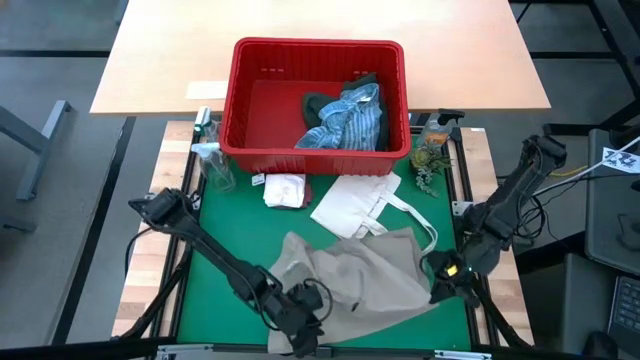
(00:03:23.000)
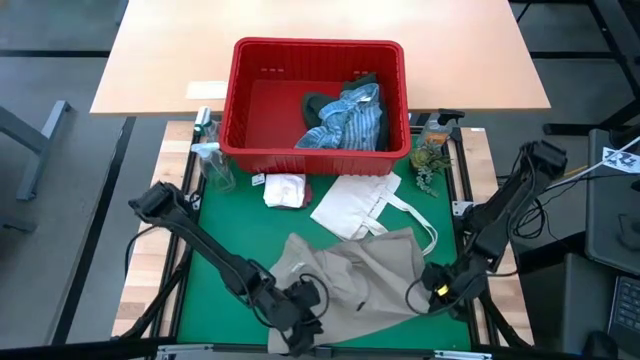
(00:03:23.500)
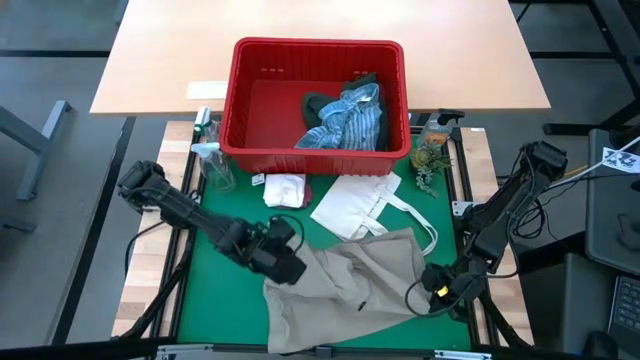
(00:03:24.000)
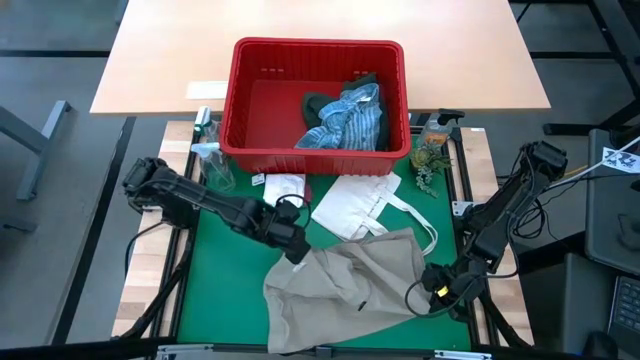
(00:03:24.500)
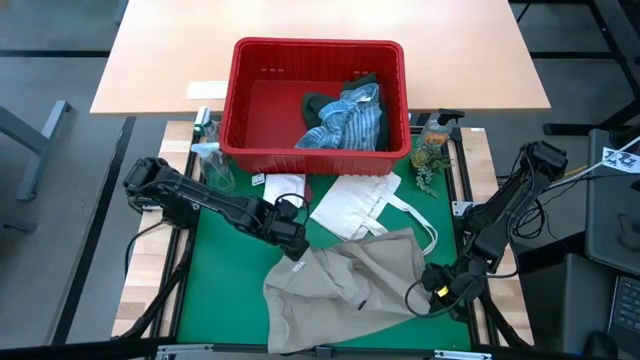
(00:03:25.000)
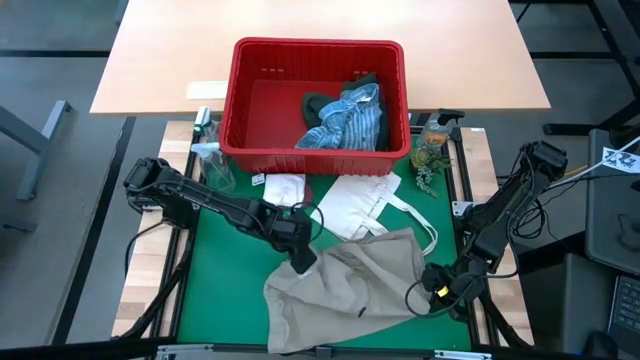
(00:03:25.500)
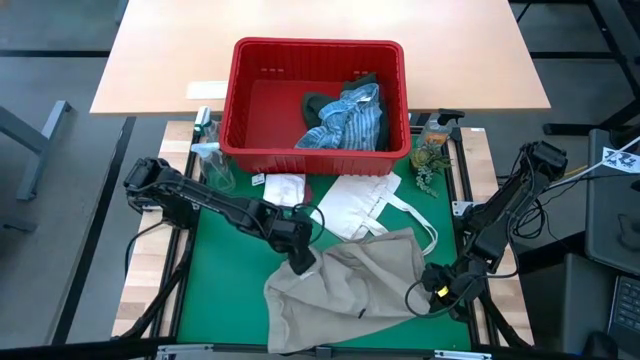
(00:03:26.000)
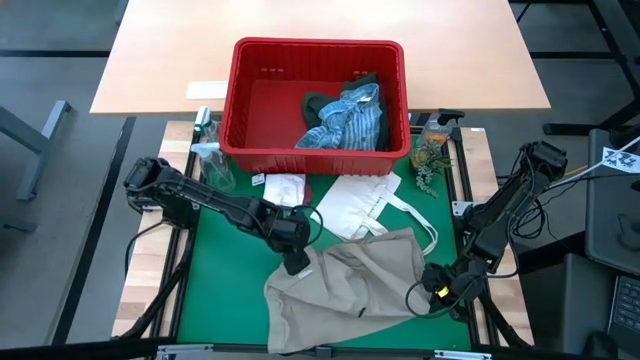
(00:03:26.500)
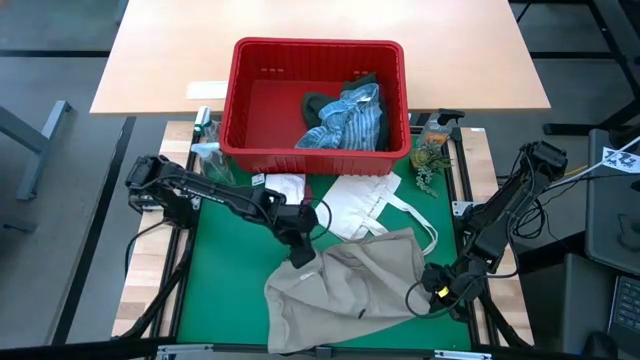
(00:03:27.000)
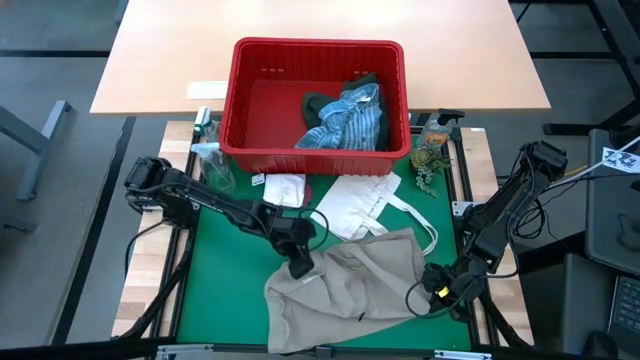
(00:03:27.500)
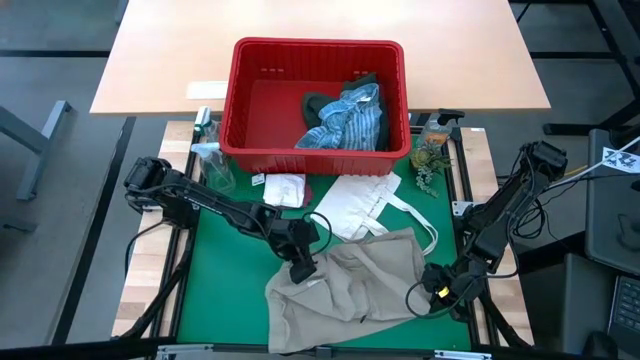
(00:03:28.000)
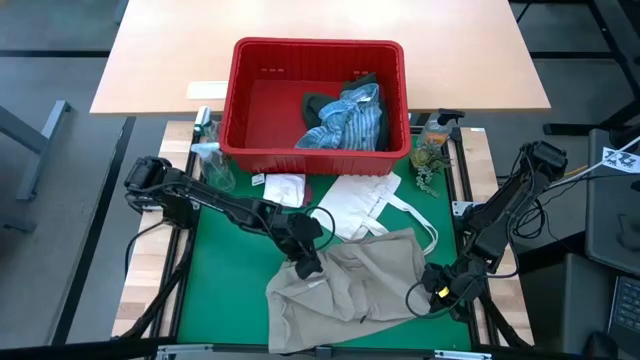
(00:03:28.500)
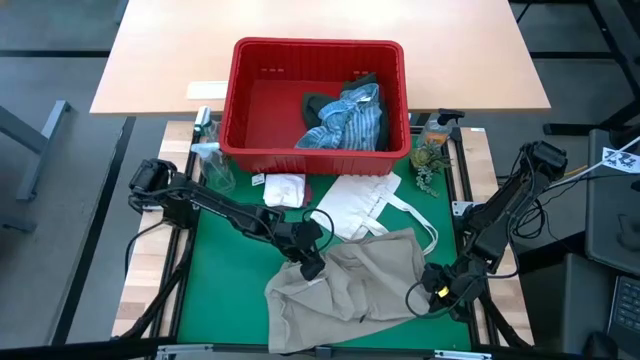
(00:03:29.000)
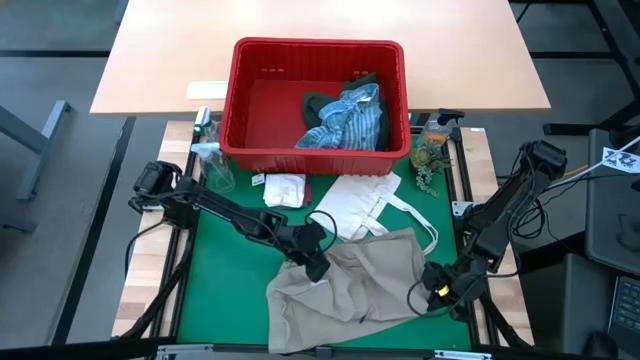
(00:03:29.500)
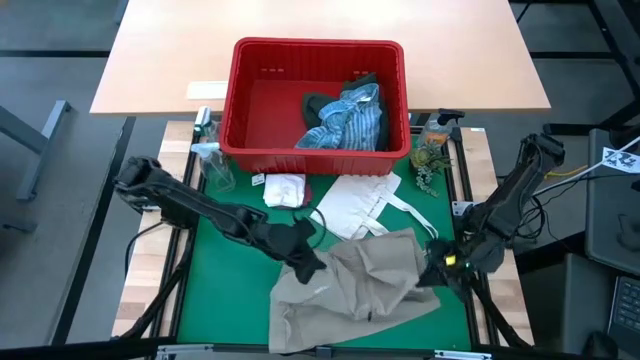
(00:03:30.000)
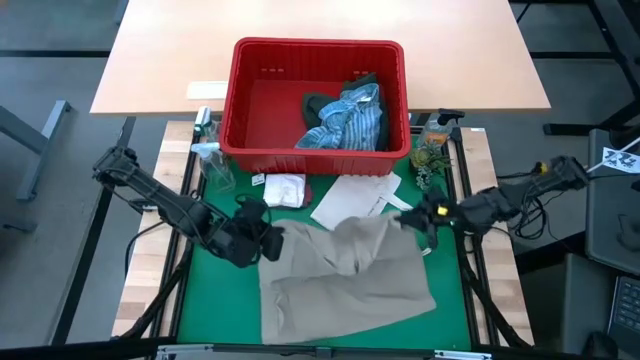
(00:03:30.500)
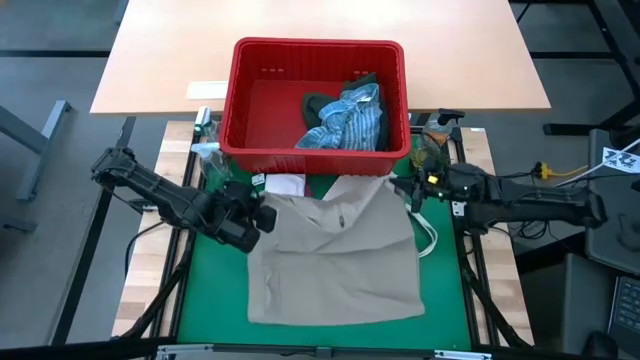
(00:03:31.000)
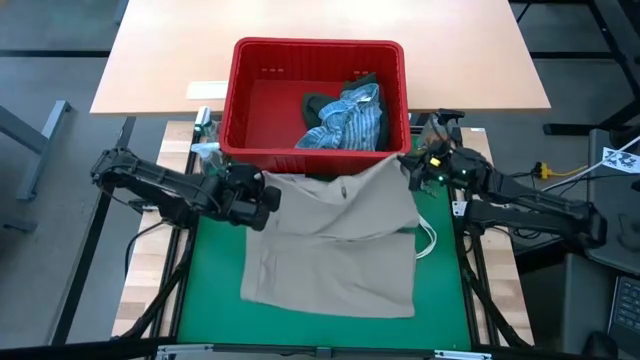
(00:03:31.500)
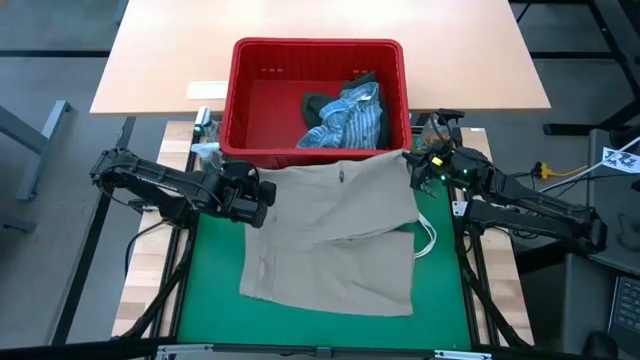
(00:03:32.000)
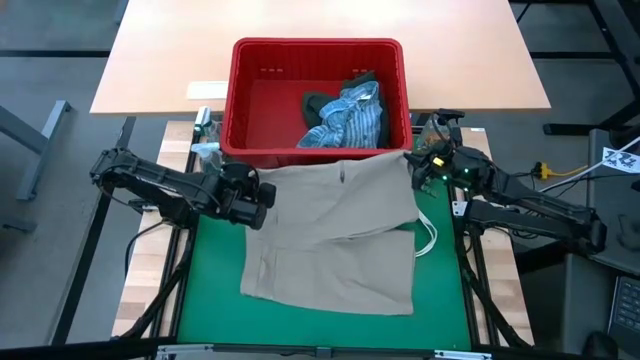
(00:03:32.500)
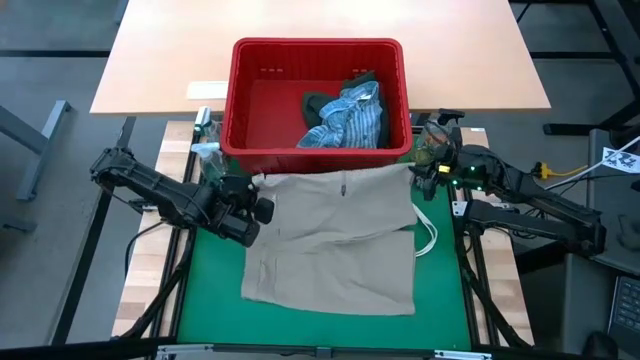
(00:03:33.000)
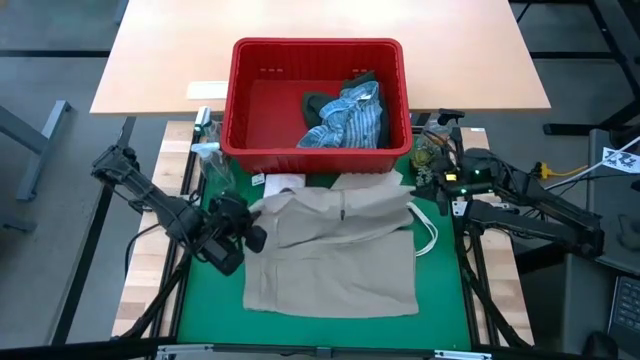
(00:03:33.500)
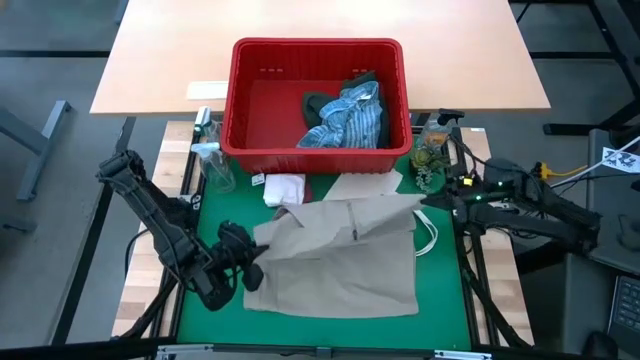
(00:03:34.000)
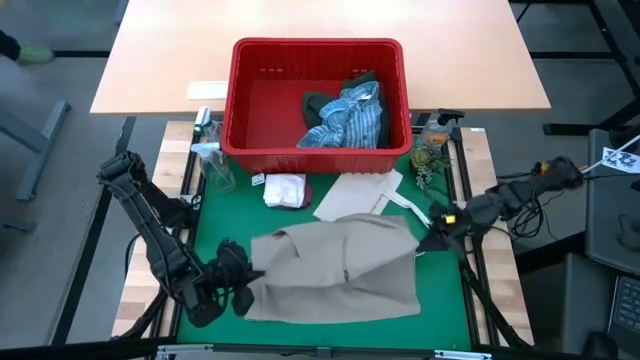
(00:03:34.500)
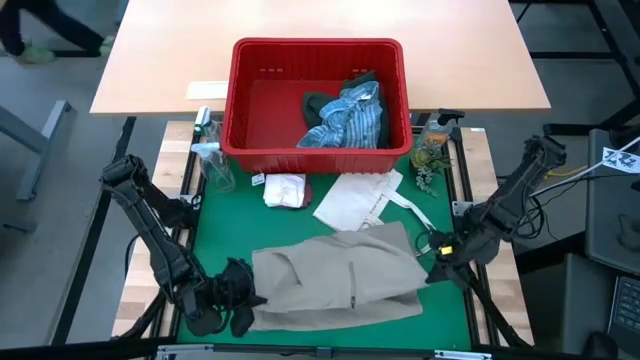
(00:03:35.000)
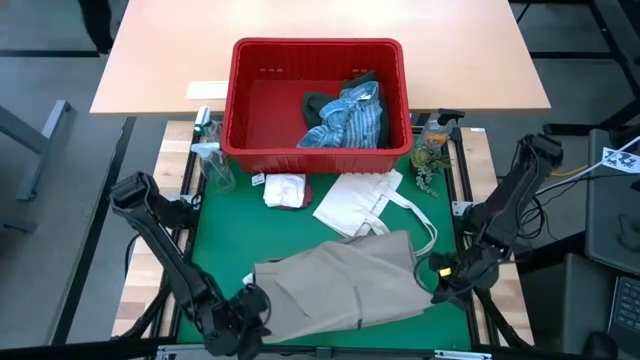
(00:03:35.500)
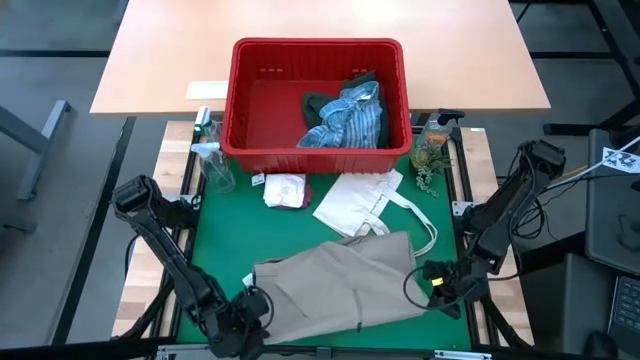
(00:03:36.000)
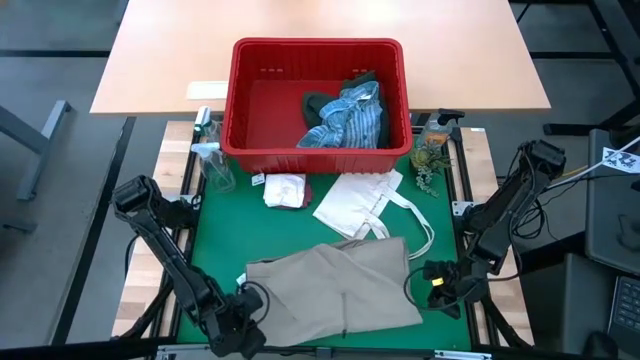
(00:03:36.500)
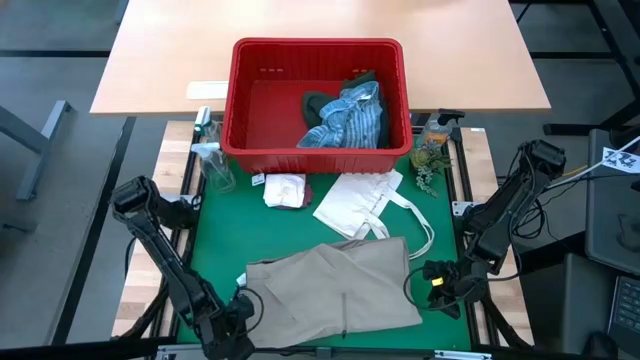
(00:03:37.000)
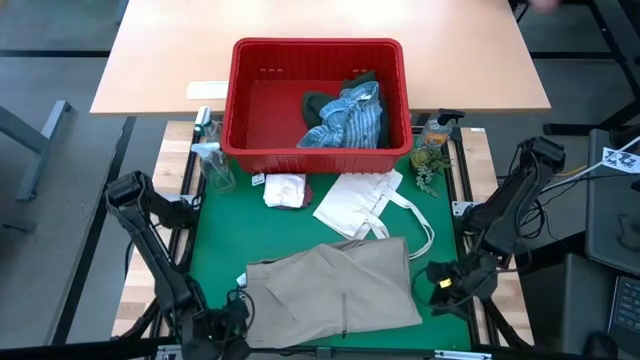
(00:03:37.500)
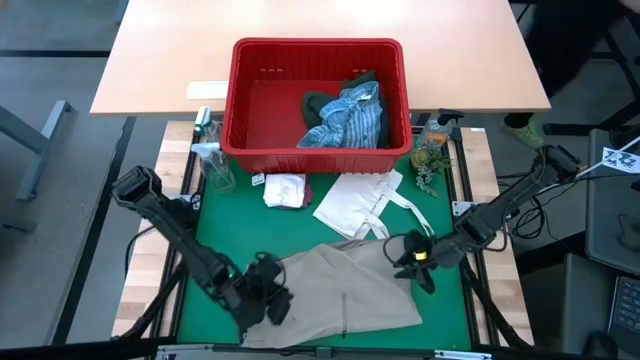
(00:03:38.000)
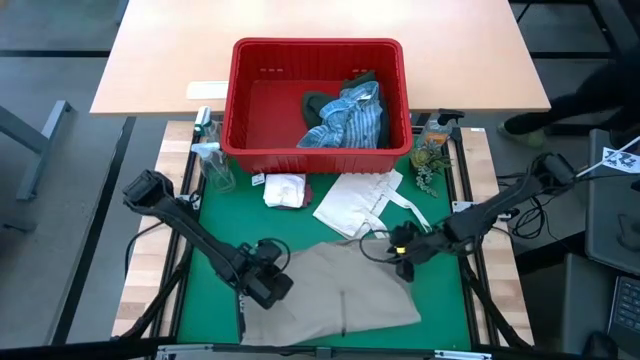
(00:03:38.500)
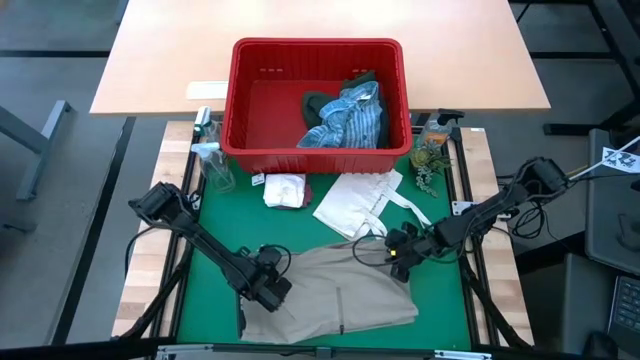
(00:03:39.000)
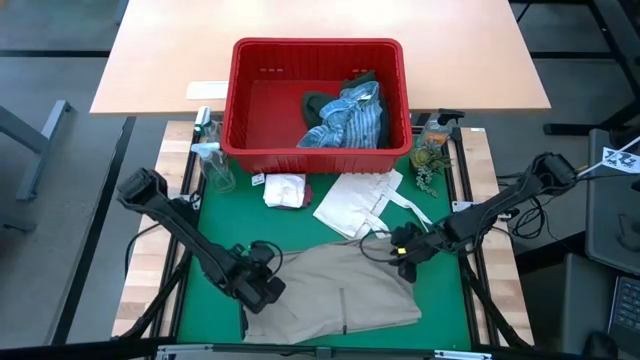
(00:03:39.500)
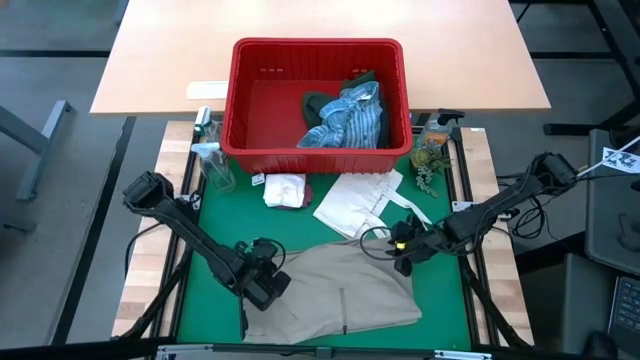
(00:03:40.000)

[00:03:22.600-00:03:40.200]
Task: Fold Laundry from Bin
Fold the gray shorts
